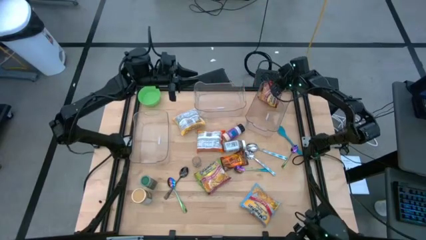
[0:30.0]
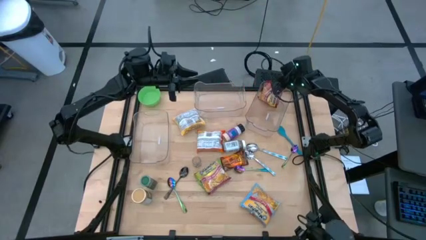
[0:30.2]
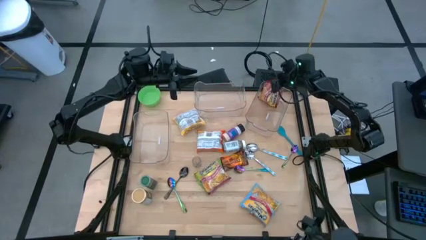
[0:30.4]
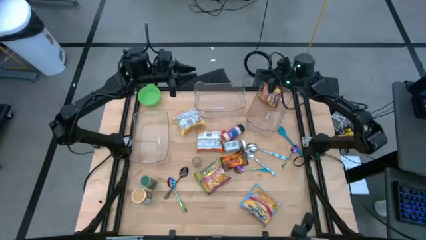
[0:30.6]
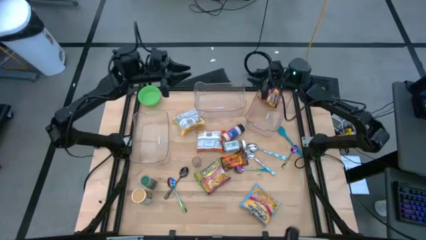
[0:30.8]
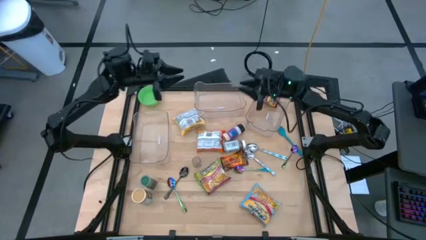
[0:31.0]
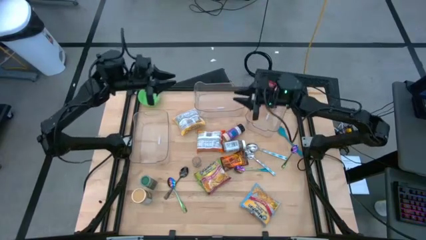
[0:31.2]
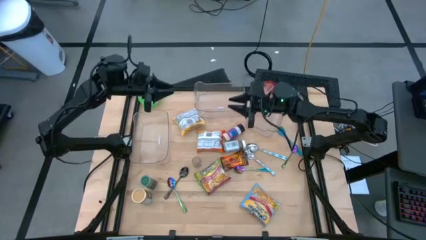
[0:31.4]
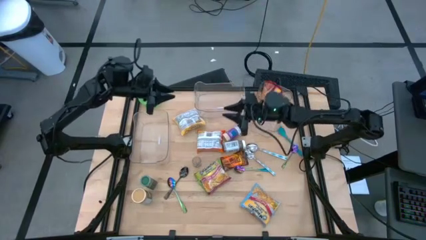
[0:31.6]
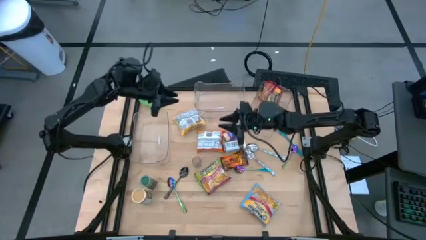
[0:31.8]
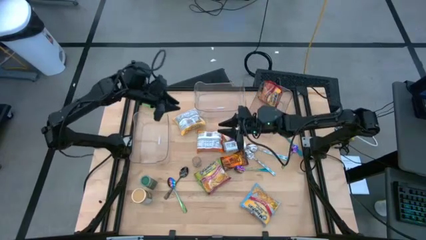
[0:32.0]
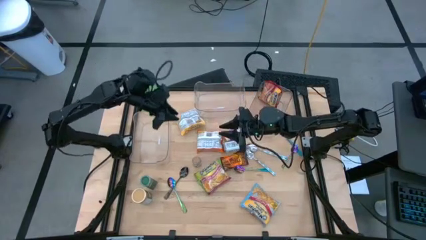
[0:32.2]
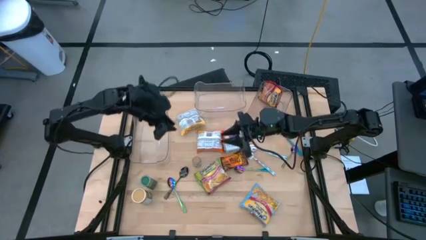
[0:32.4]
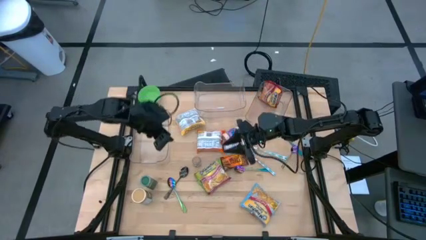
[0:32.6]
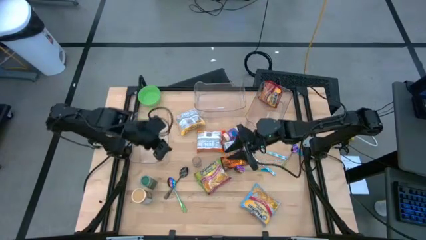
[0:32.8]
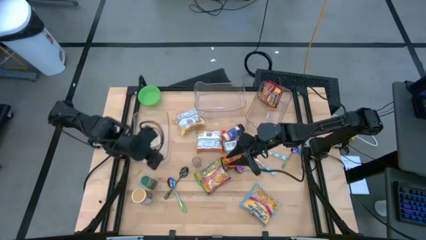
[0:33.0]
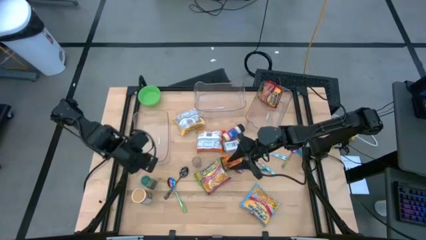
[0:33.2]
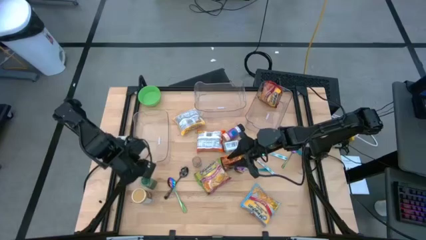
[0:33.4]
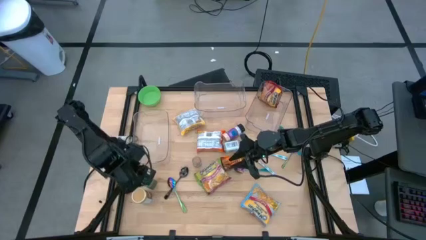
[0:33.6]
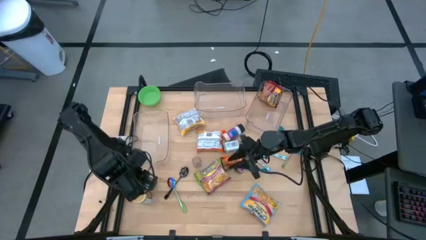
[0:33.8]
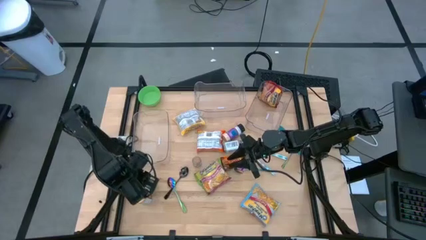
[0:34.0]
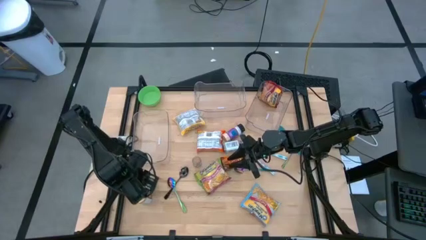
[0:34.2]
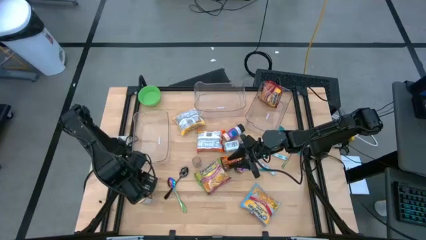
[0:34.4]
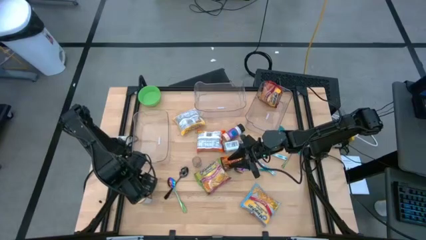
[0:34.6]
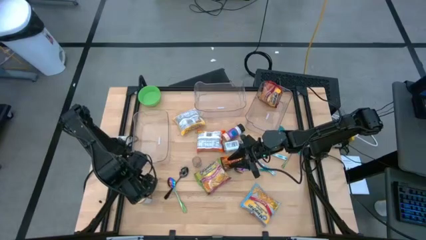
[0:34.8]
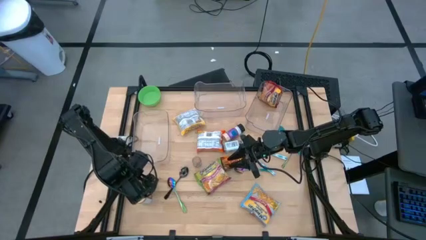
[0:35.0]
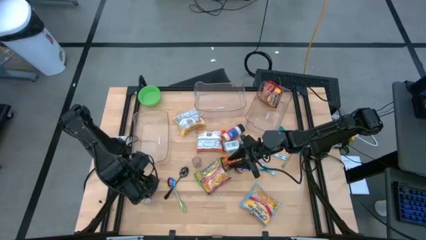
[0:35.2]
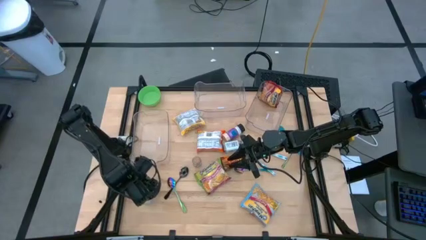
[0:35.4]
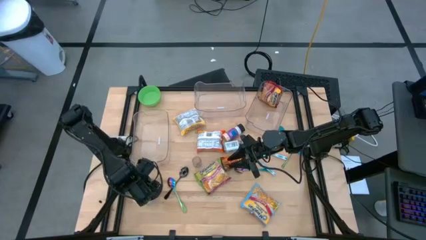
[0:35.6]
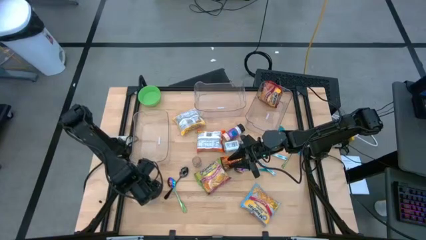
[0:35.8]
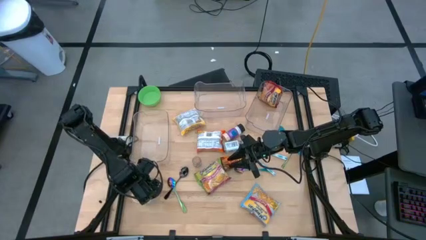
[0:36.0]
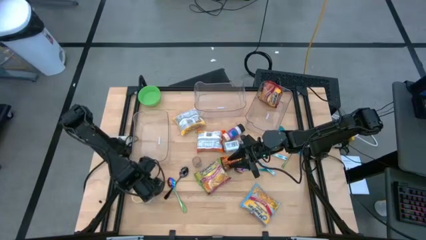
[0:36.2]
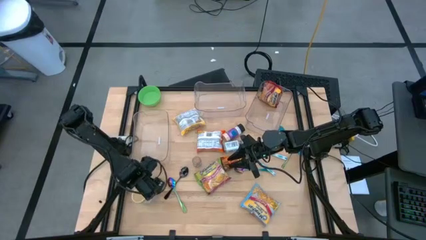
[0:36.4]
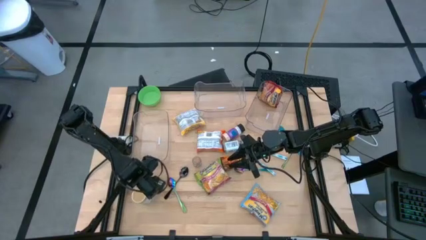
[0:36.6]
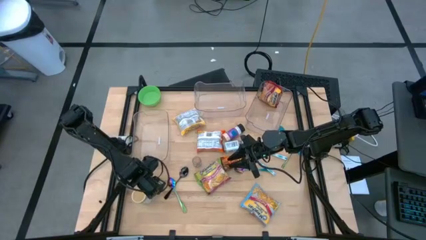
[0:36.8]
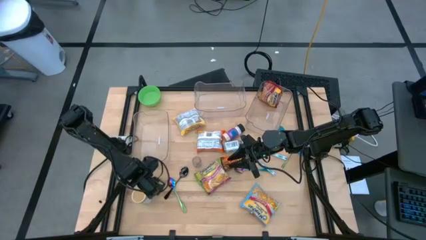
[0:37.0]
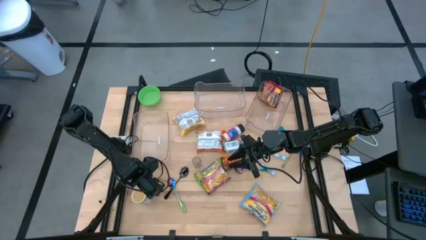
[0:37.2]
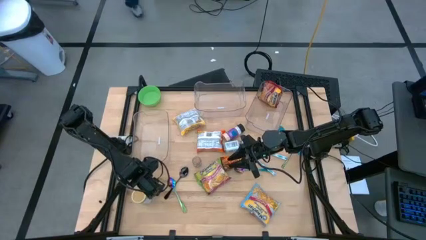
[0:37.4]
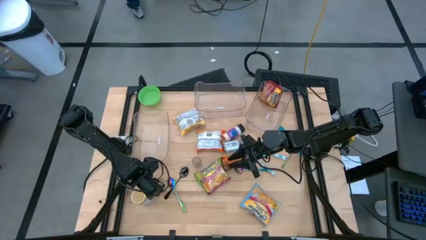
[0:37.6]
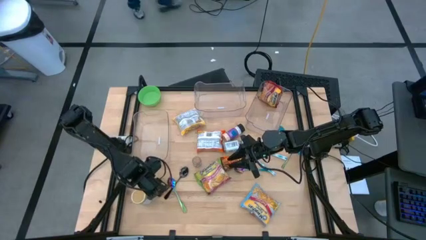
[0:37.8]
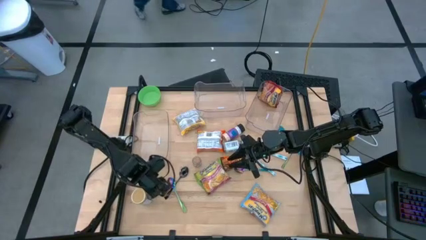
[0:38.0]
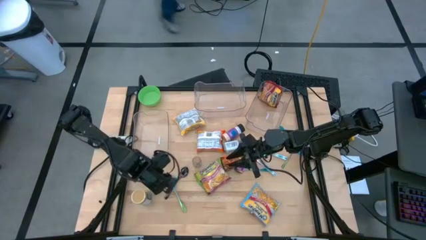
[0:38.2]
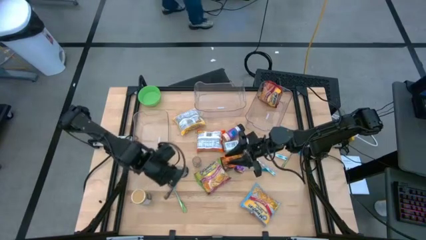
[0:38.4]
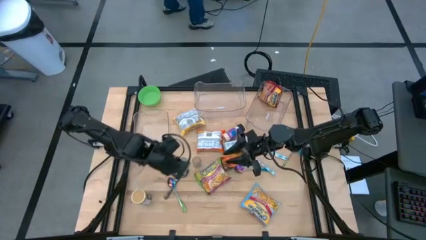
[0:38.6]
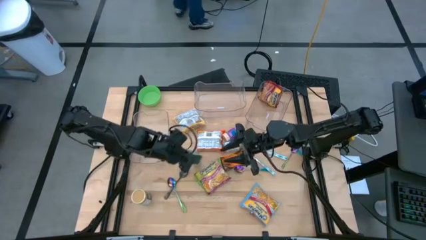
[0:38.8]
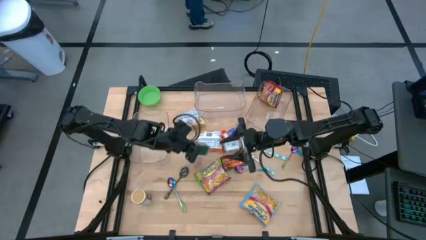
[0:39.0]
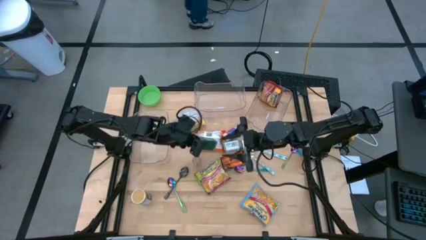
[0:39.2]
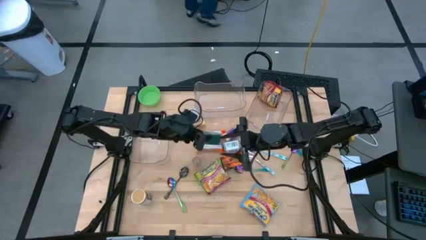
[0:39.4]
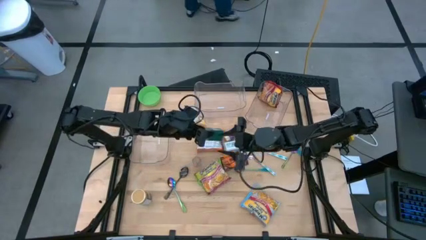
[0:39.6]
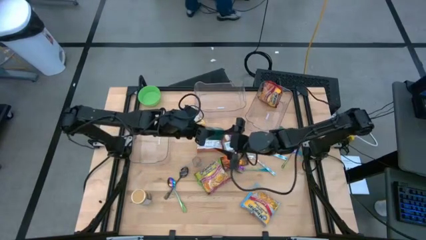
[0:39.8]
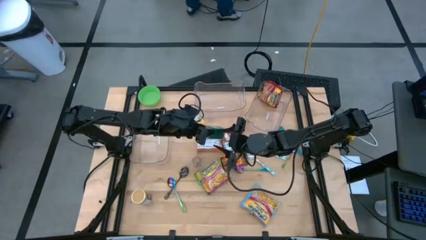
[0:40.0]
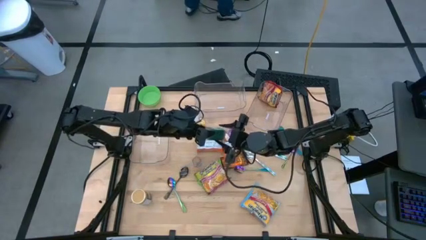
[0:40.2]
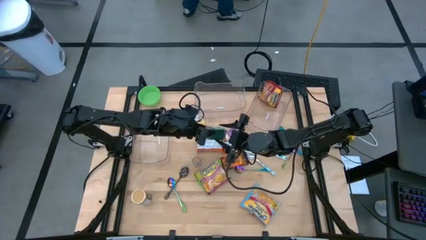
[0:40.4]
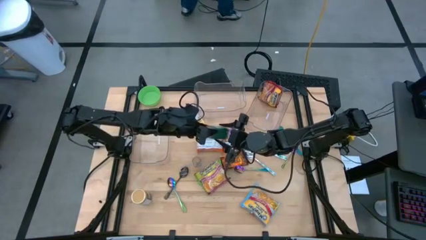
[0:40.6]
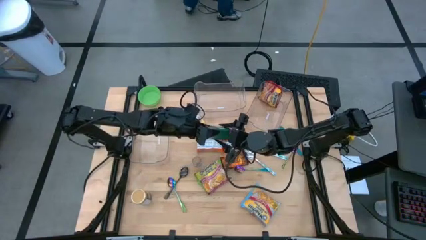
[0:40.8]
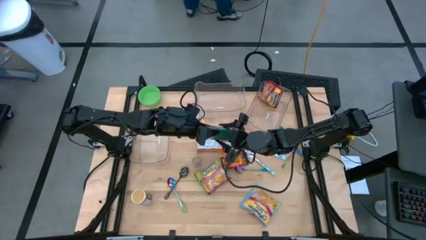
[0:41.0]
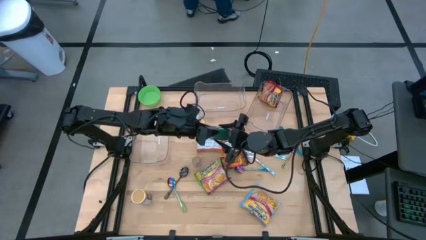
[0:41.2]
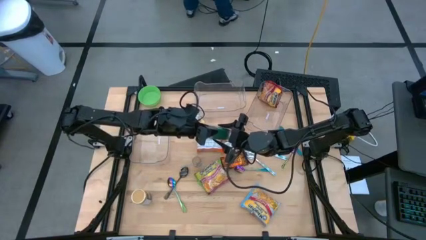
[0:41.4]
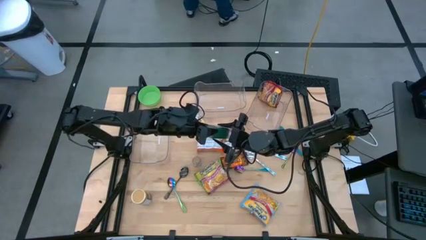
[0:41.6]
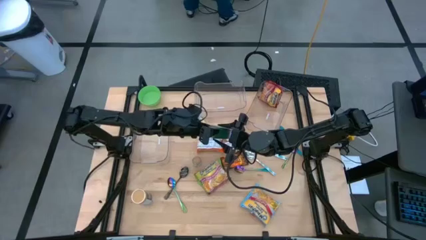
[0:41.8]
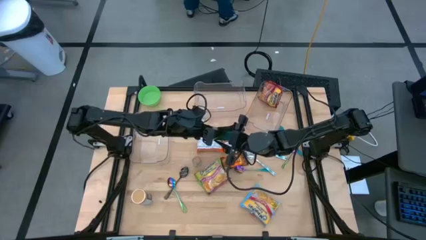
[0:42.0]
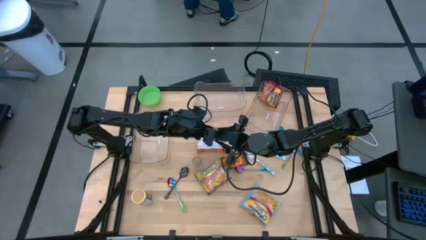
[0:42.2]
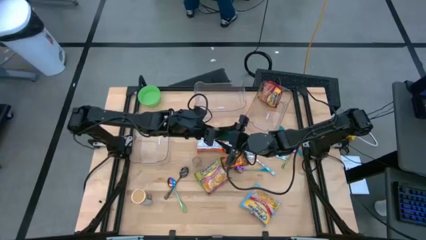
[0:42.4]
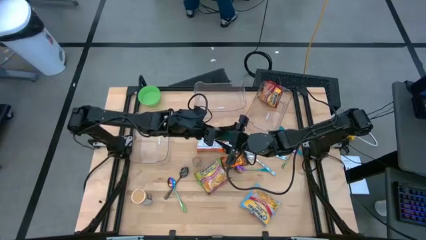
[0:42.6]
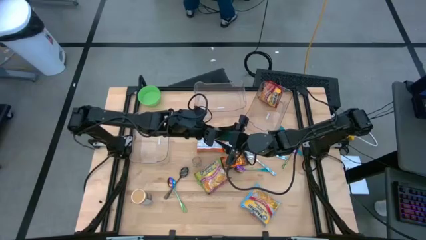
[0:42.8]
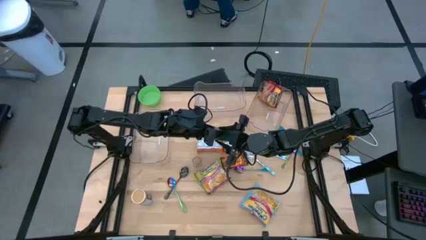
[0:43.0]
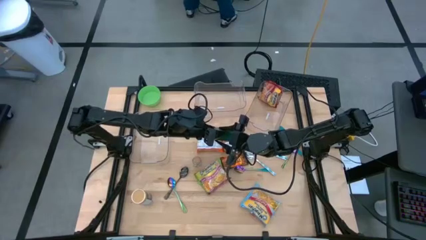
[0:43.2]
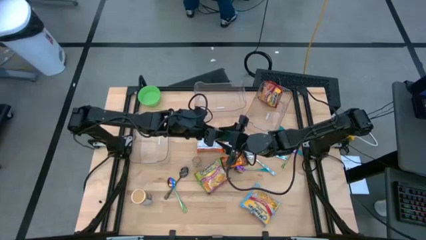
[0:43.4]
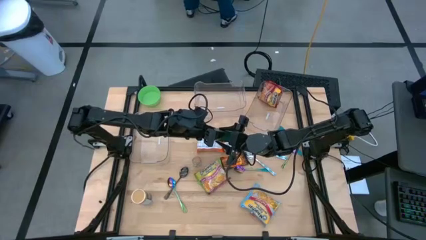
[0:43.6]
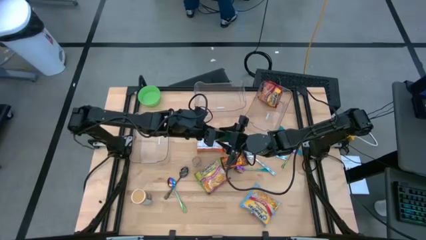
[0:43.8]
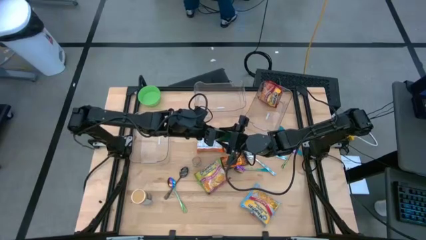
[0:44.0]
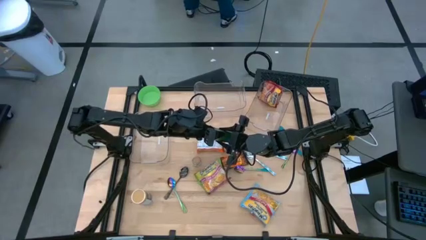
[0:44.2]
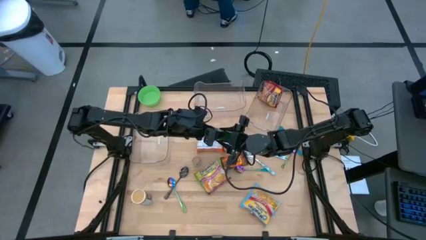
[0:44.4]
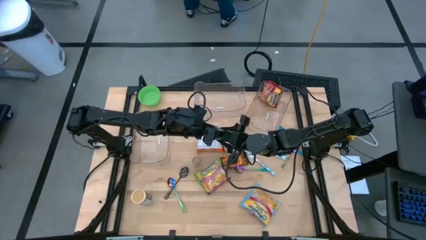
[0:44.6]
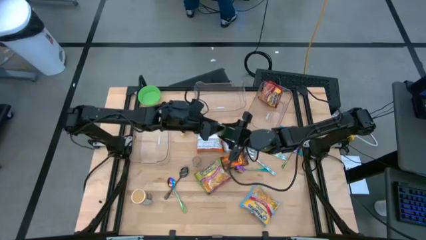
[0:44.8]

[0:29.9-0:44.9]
Task: Pick & Place Food Item
Put the green spice bottle into the middle transparent bin
